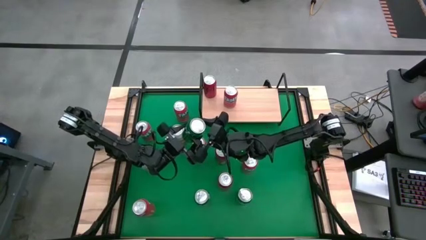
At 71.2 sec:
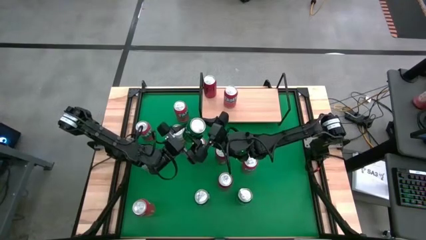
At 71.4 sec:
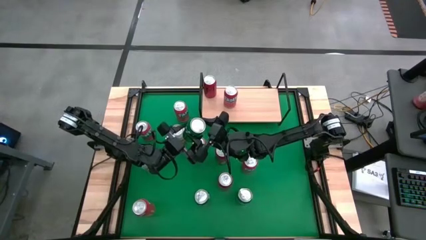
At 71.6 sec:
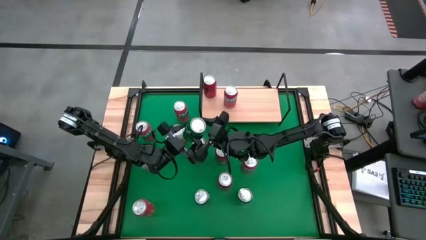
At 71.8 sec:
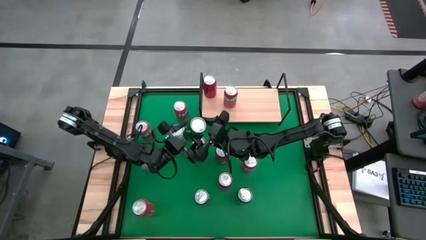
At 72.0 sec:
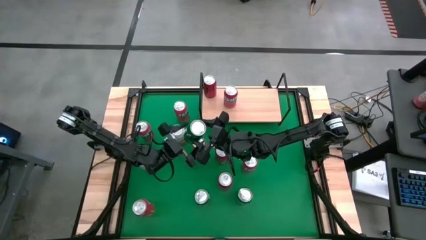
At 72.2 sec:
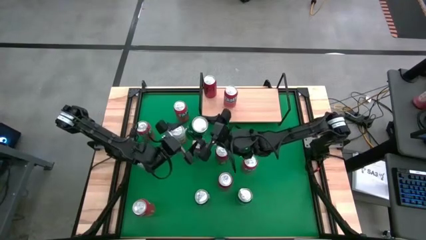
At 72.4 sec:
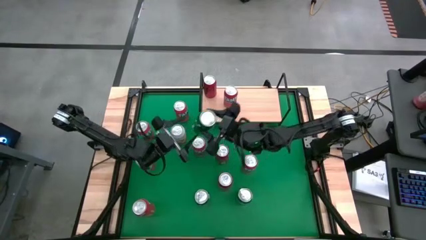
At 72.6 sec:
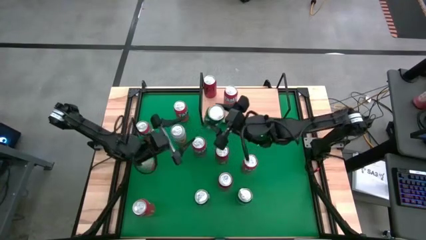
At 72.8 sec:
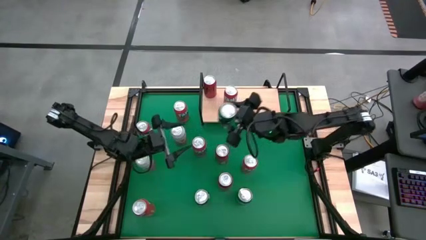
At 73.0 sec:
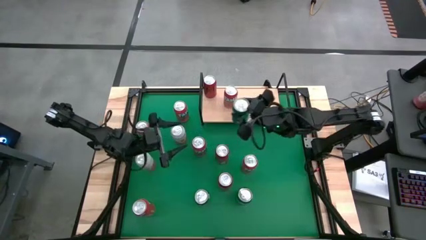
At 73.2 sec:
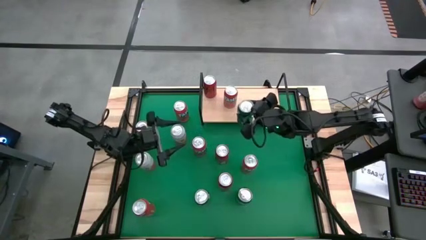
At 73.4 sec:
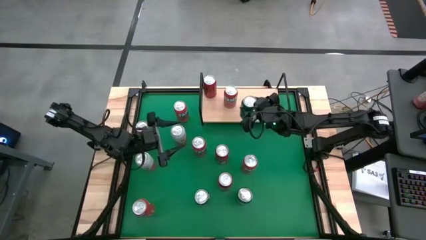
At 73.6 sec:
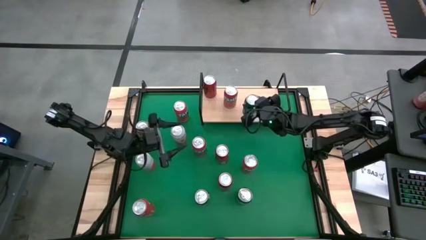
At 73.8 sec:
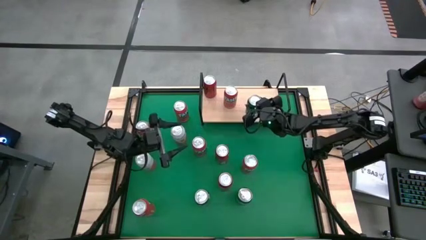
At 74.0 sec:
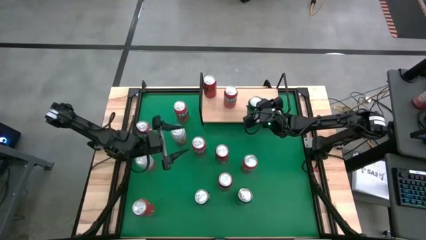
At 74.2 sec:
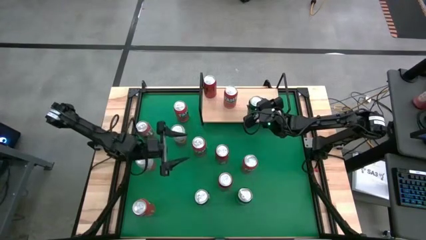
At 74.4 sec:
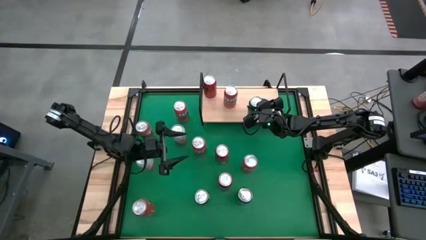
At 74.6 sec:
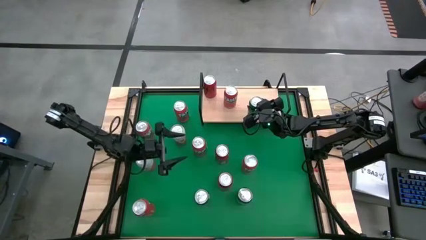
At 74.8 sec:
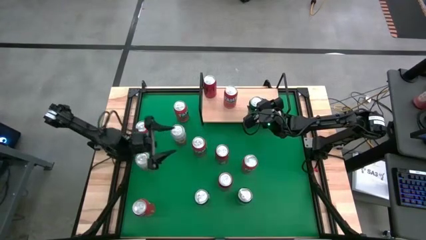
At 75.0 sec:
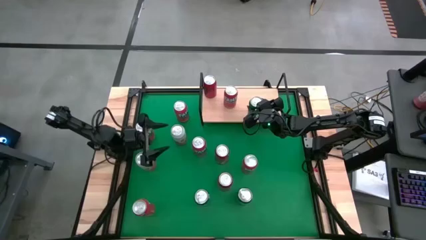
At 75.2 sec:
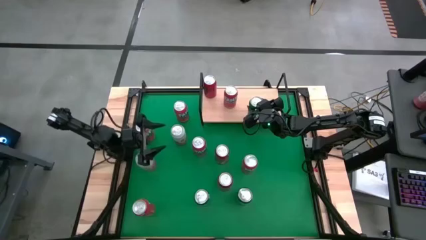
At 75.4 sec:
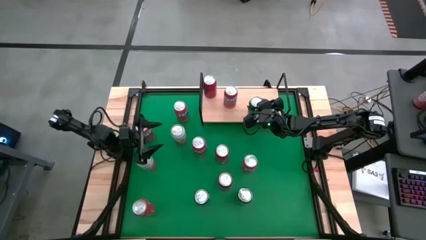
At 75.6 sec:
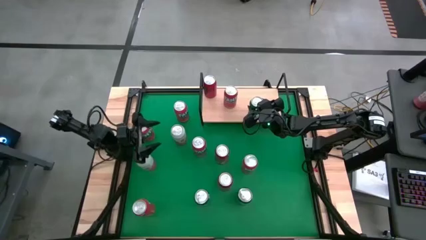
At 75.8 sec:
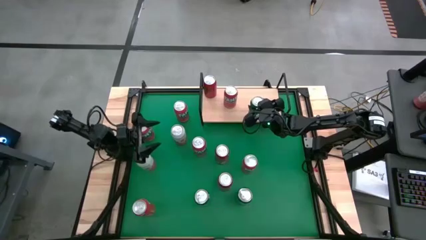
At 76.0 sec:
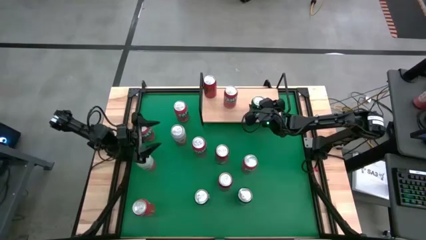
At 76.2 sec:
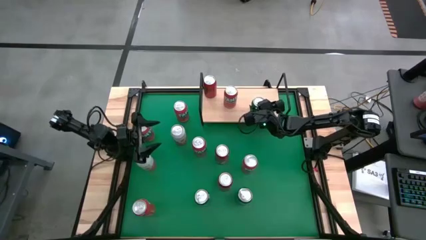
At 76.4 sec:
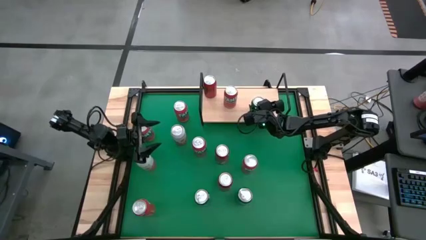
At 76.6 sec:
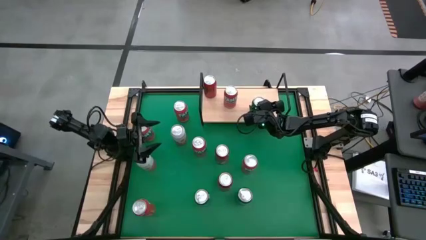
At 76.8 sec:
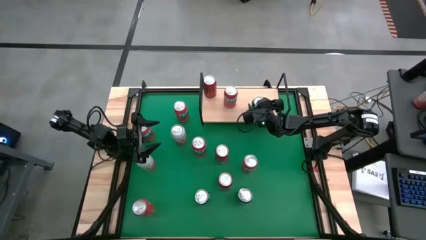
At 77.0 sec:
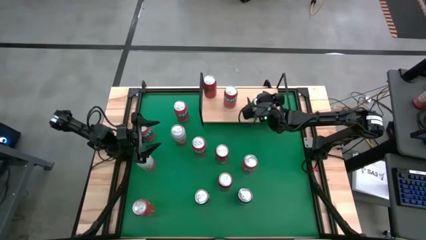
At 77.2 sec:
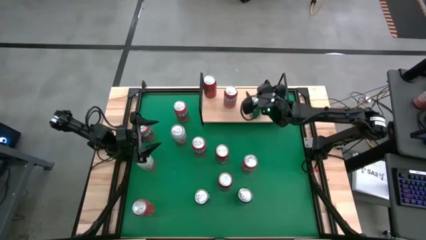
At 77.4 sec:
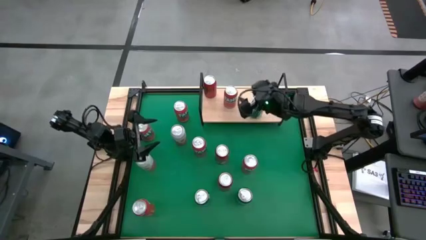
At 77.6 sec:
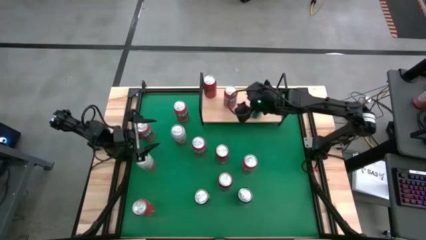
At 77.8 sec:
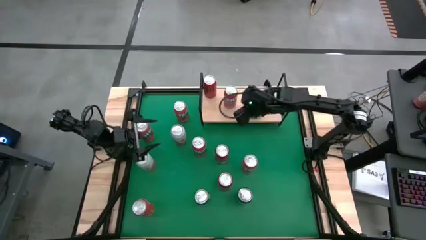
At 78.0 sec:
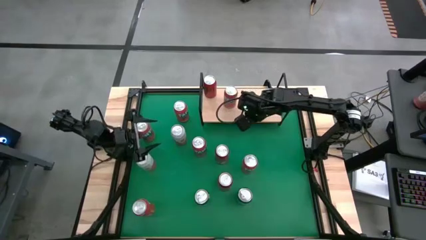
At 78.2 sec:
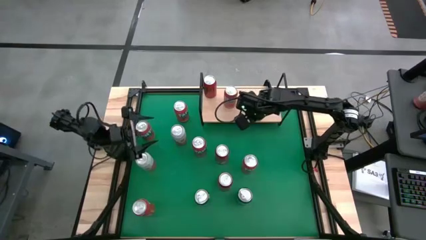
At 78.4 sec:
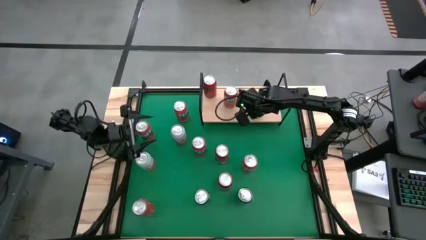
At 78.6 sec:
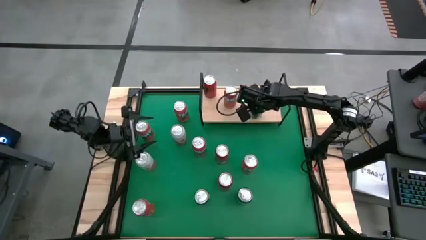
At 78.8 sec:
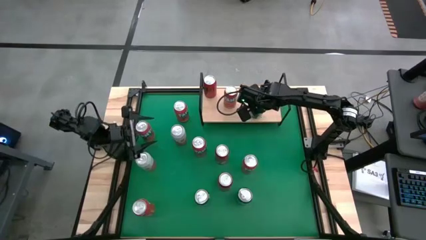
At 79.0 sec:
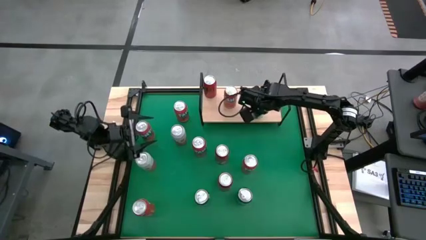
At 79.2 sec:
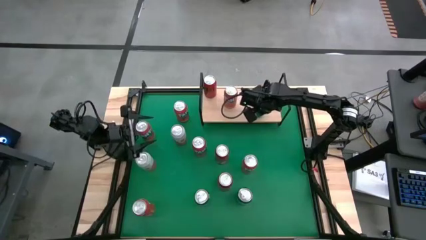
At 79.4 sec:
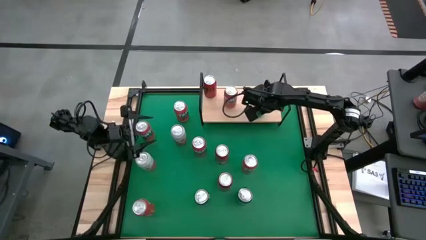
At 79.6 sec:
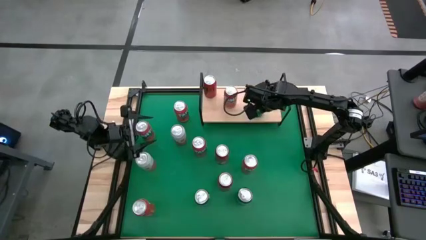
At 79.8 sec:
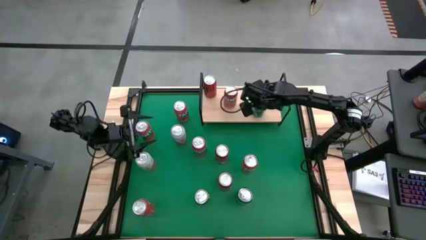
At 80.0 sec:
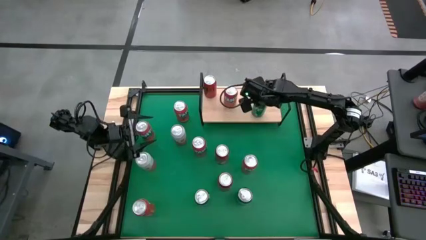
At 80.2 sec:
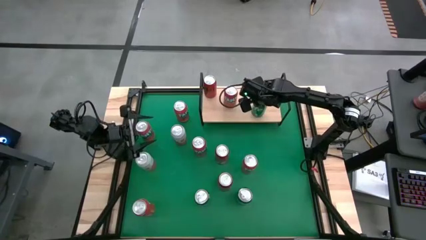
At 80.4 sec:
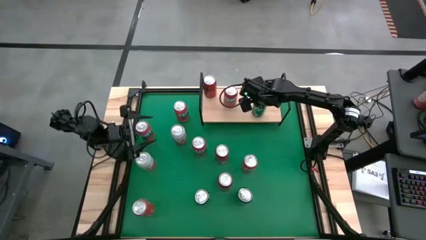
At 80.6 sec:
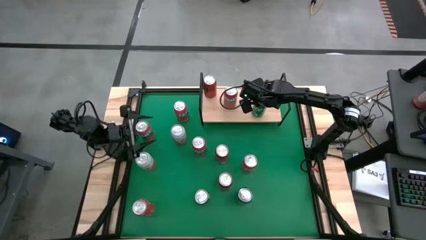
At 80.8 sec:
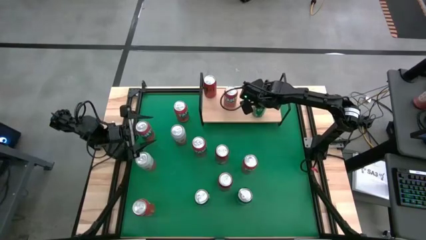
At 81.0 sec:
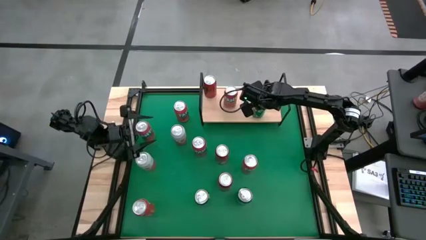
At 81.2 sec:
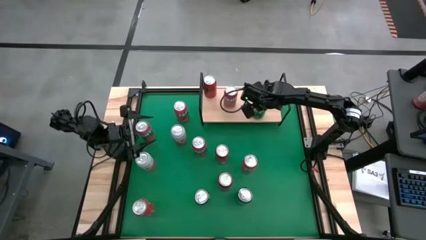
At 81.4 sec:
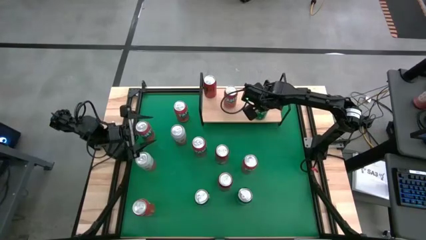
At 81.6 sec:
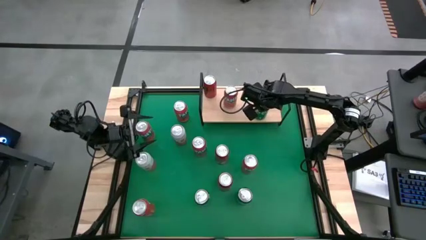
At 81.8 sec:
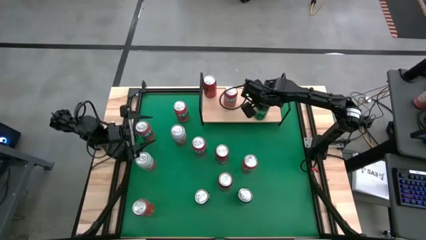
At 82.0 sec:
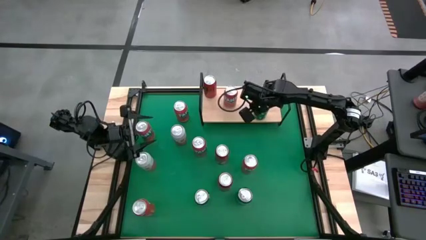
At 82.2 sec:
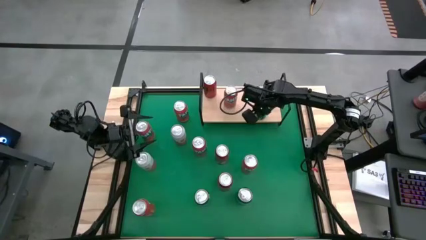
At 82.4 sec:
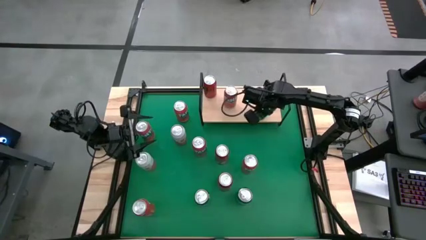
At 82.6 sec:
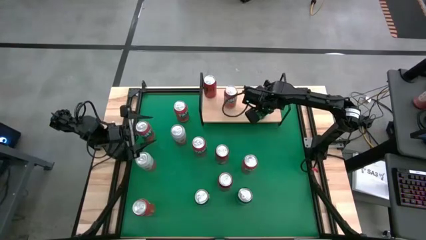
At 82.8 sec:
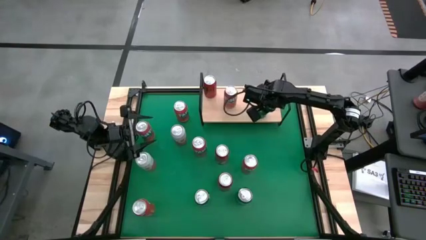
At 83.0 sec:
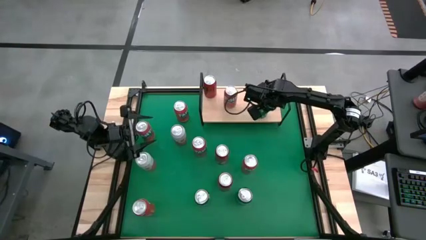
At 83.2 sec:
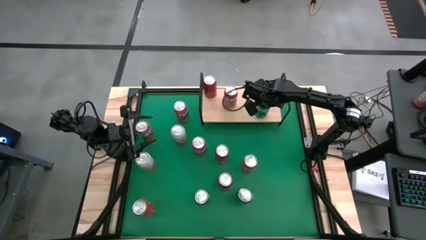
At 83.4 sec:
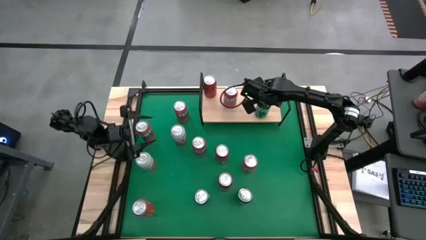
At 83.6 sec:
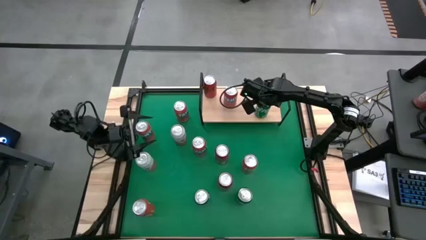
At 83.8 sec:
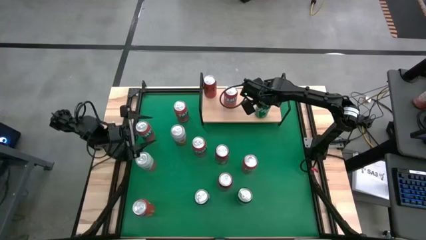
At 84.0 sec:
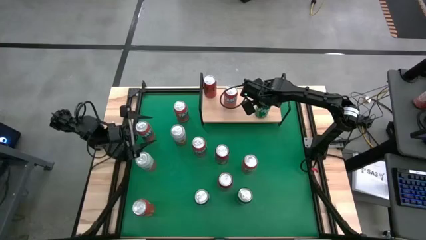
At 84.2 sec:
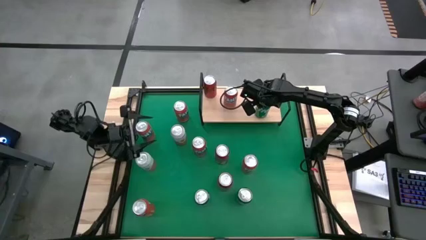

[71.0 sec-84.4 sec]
Task: Place canned beverage on shelf
Put the green soda can on the shelf
